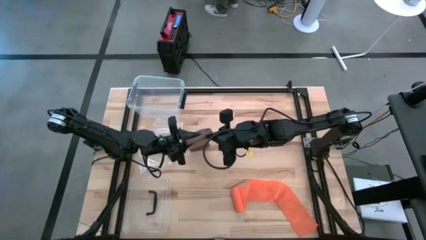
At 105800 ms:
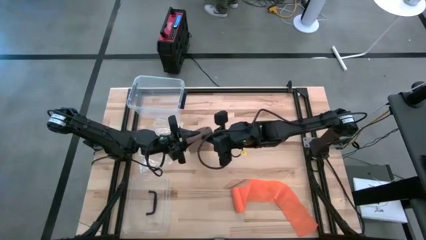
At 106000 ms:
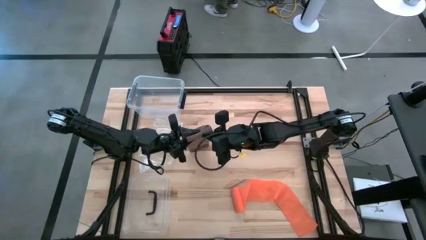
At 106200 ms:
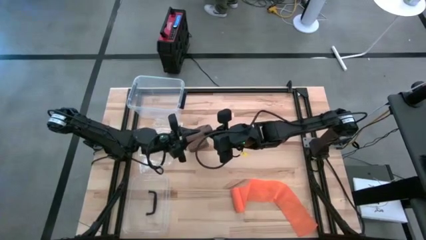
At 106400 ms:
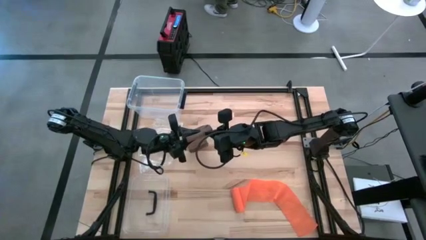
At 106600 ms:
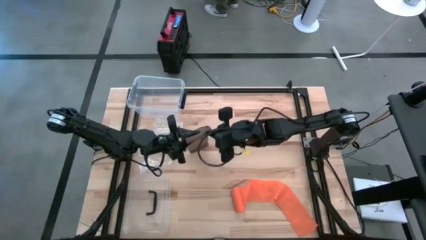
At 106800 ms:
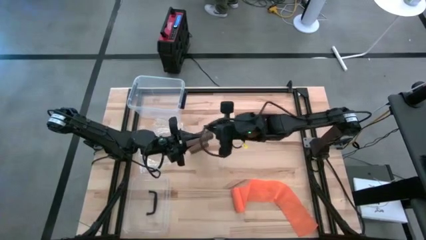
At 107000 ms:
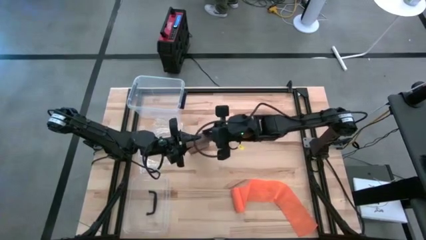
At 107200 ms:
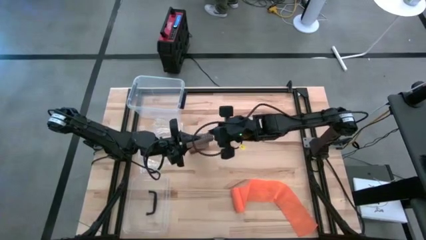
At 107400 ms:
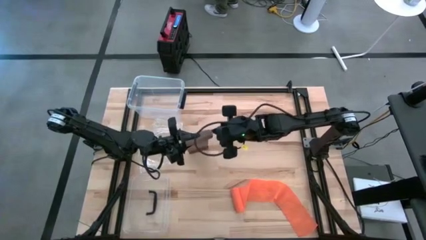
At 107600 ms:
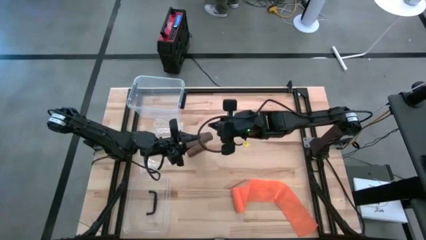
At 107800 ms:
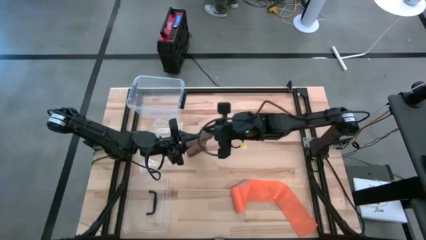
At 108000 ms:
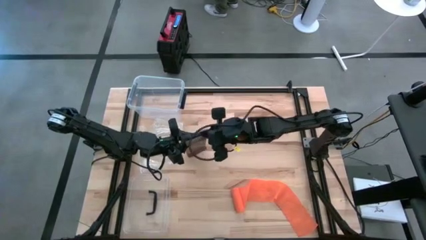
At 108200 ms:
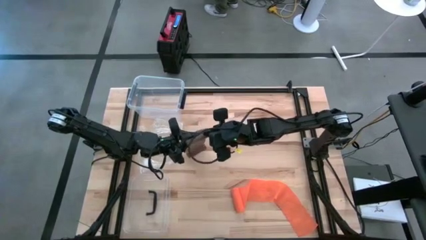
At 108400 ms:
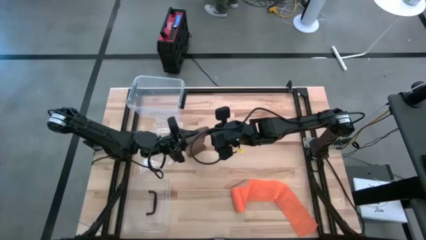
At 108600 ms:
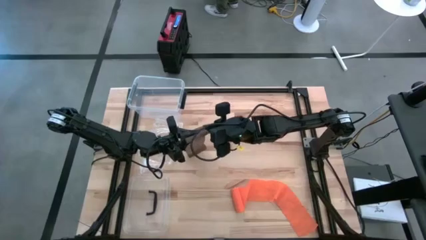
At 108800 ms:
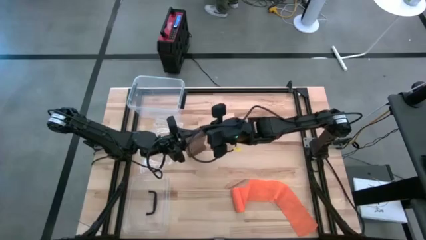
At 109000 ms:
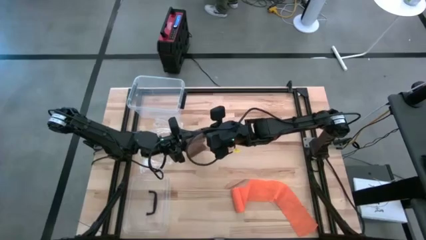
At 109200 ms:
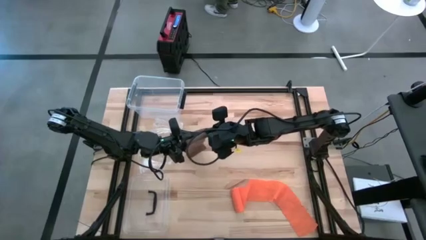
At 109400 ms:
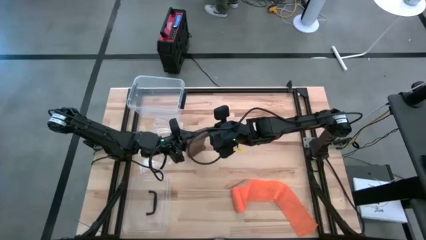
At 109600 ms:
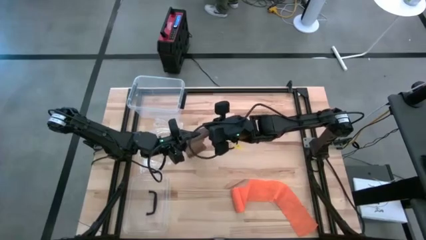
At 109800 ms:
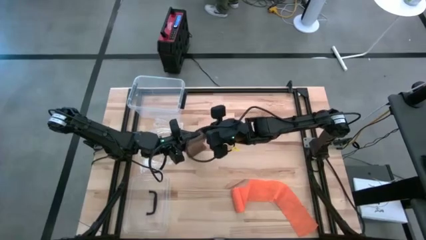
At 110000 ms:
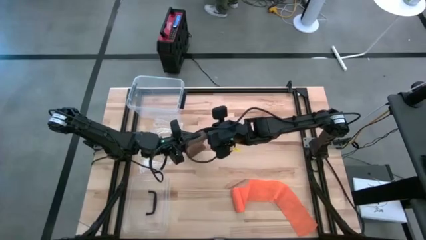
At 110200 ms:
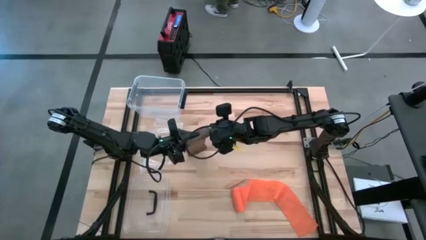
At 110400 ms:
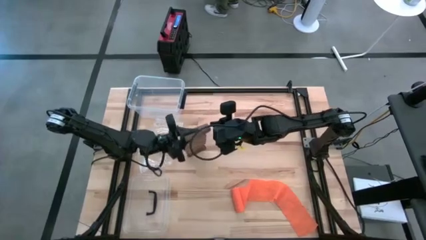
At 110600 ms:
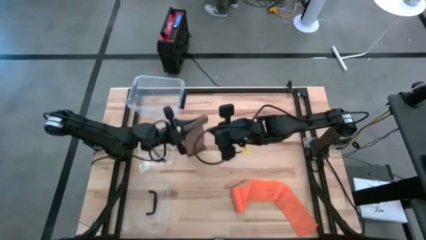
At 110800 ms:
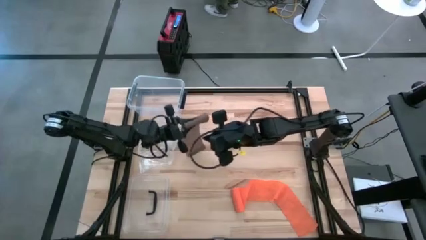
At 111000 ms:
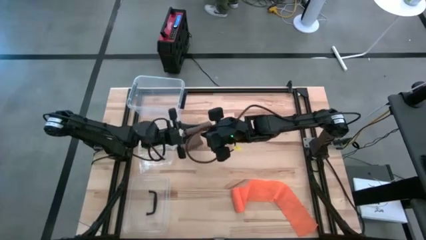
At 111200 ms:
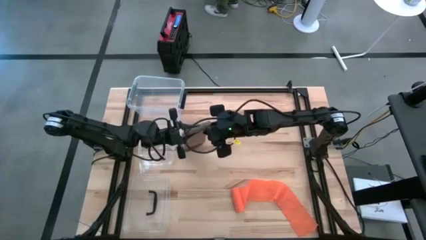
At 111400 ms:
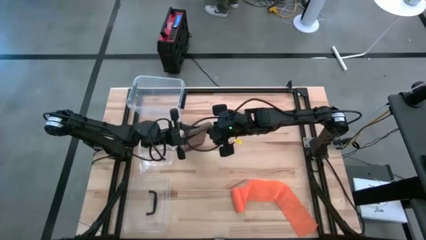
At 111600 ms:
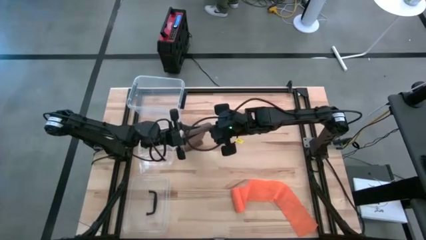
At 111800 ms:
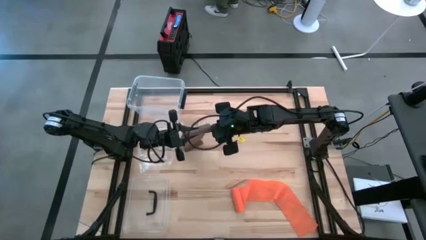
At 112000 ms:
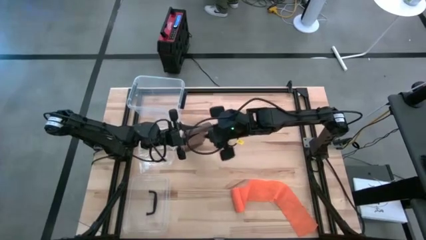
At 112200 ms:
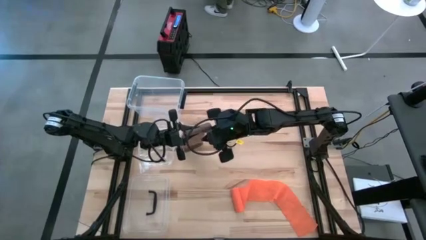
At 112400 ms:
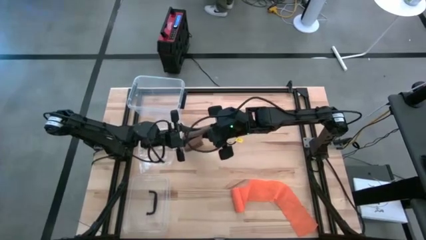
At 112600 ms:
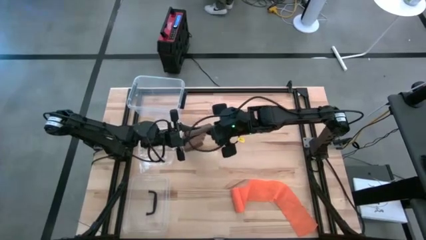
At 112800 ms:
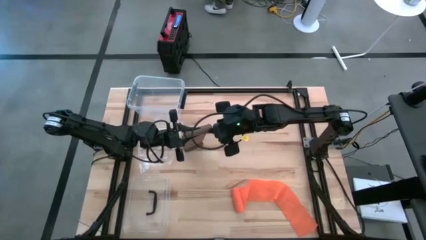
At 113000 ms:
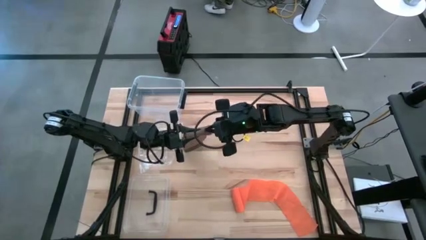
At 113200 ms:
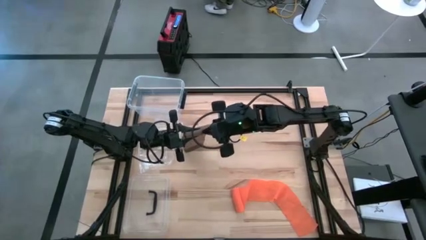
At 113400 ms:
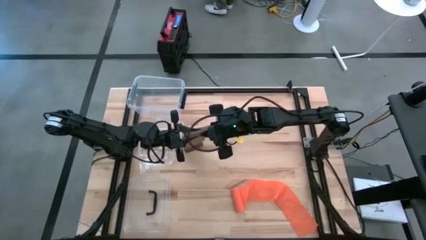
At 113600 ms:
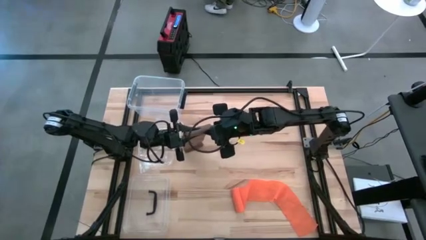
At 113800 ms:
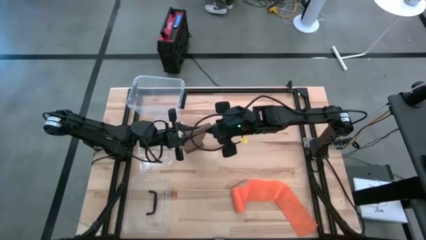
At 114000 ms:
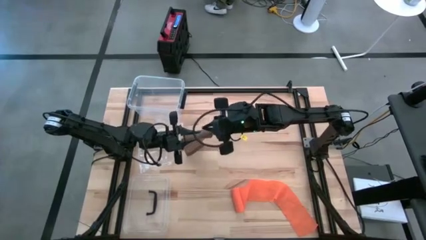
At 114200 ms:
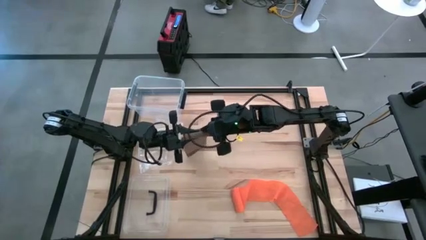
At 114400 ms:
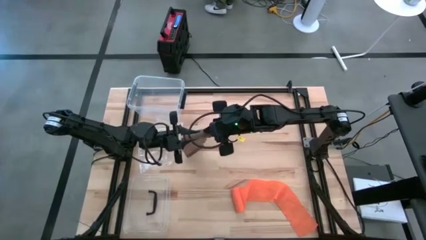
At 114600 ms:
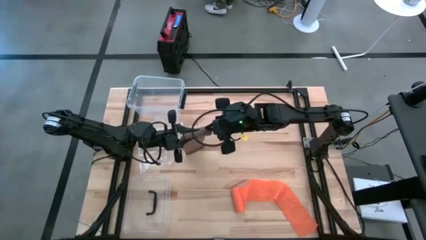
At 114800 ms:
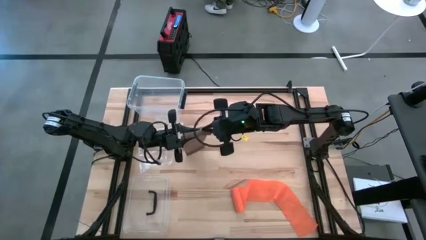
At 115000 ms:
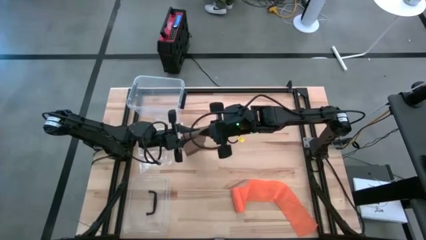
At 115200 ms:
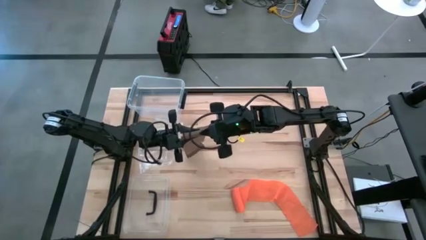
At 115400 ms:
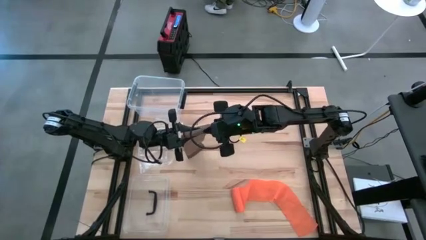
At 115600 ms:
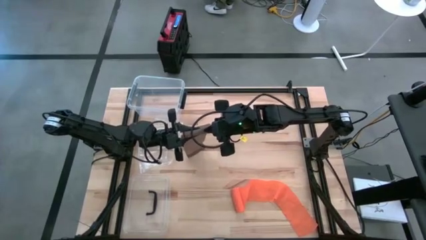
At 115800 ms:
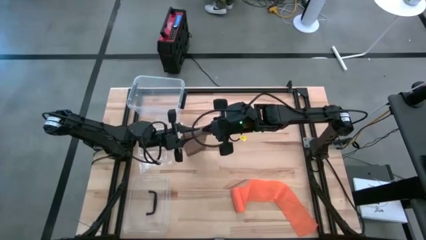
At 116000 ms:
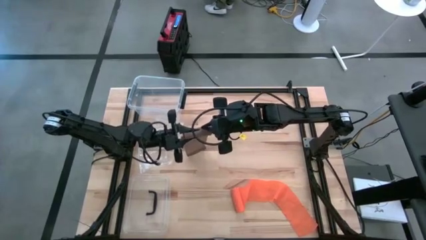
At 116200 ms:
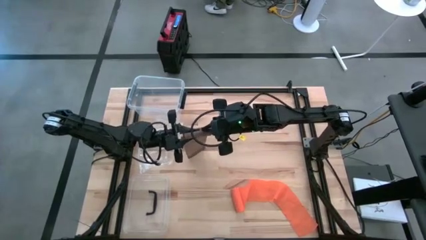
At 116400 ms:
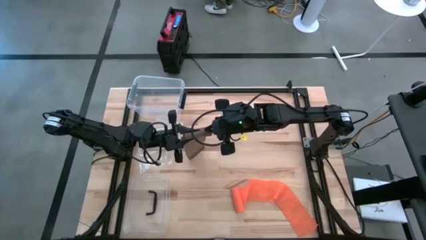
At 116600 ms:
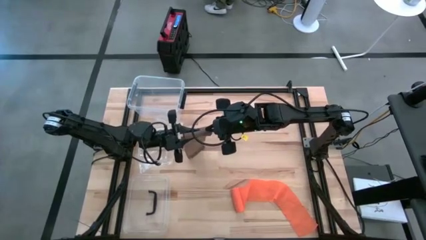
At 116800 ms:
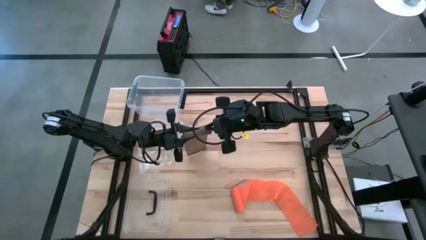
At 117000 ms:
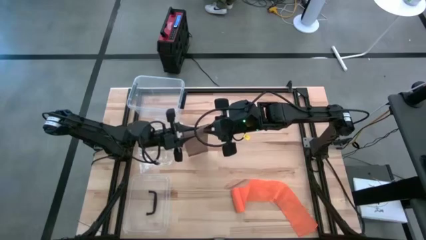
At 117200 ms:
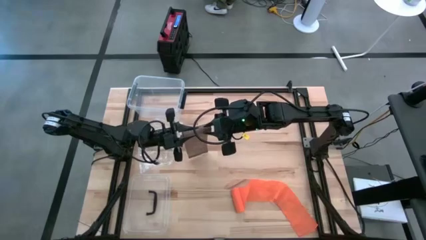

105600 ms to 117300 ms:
Task: Roll bandage
Roll the brown bandage

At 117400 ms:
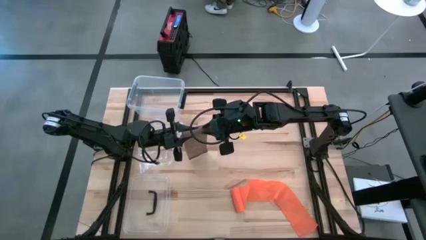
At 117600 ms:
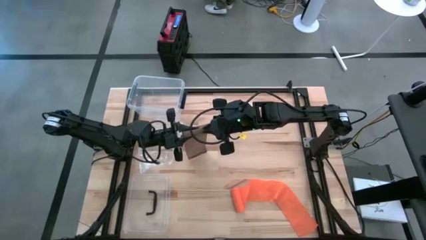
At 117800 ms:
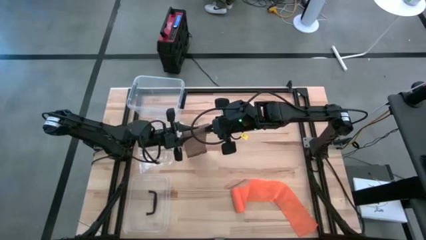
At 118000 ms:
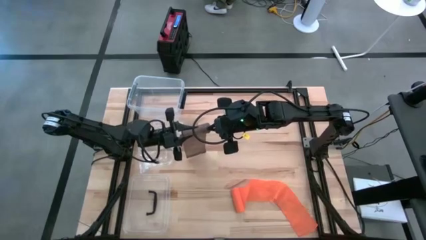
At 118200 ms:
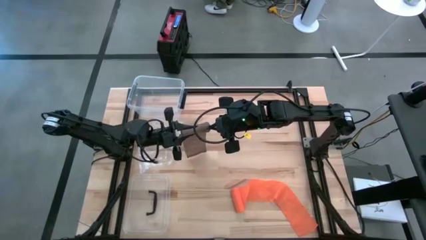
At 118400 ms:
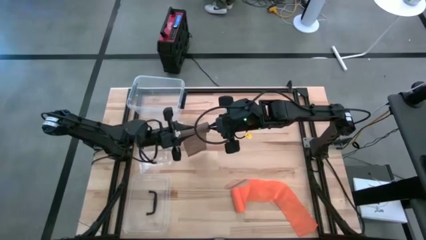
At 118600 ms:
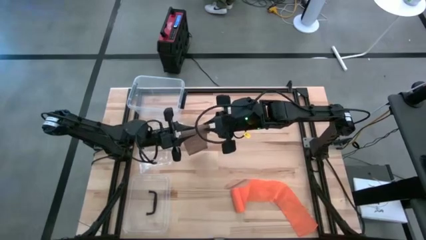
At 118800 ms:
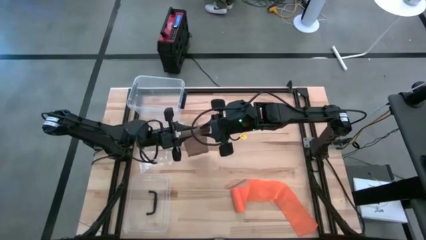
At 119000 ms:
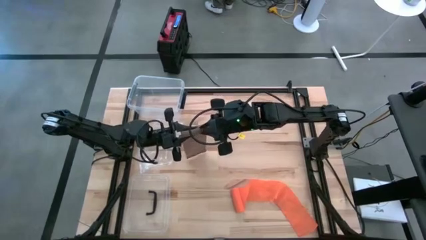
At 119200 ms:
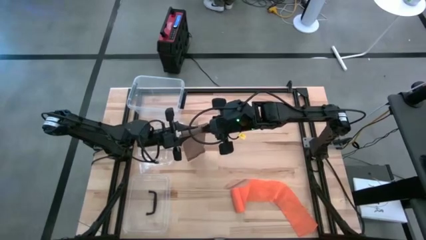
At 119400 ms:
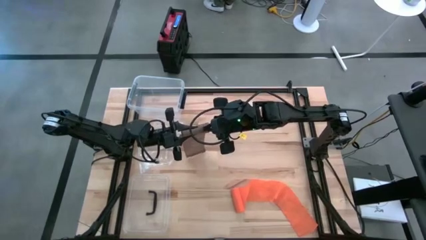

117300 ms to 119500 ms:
Roll the brown bandage

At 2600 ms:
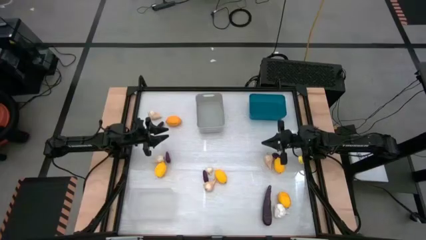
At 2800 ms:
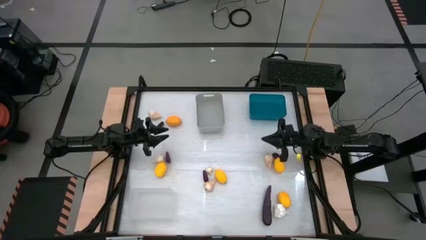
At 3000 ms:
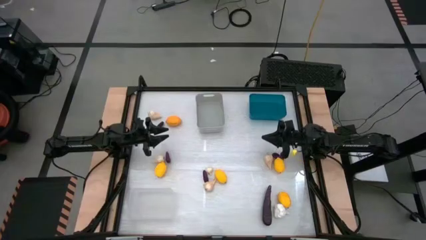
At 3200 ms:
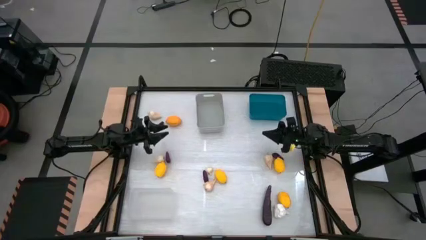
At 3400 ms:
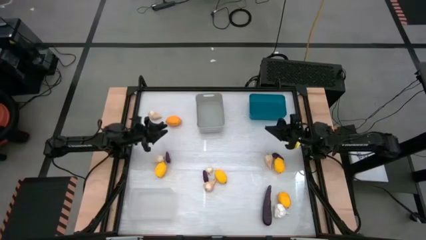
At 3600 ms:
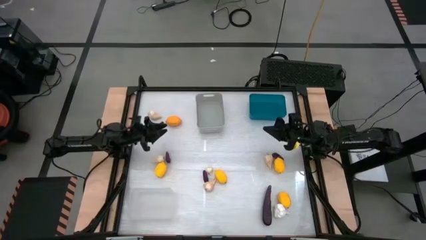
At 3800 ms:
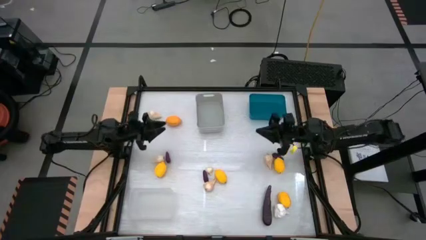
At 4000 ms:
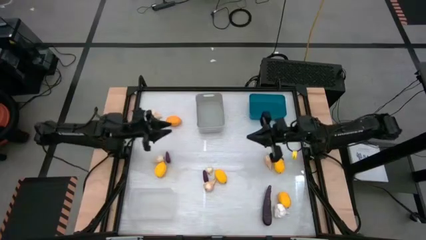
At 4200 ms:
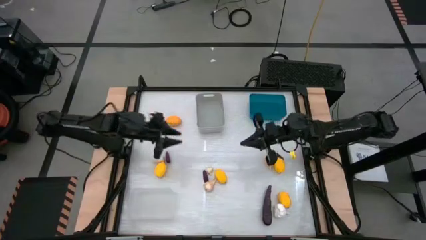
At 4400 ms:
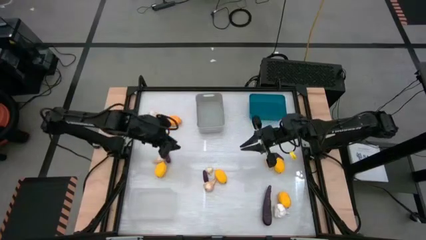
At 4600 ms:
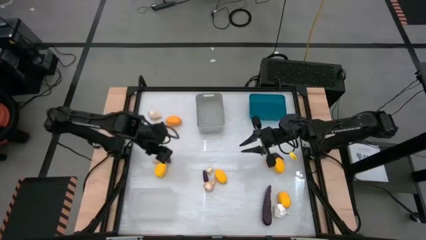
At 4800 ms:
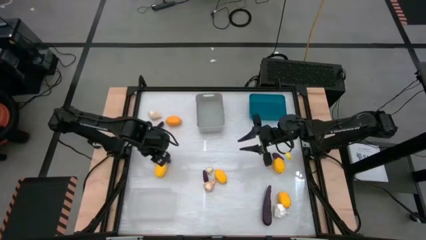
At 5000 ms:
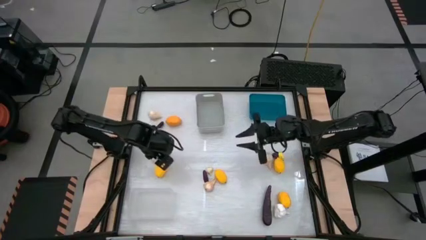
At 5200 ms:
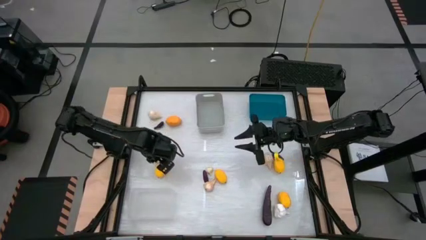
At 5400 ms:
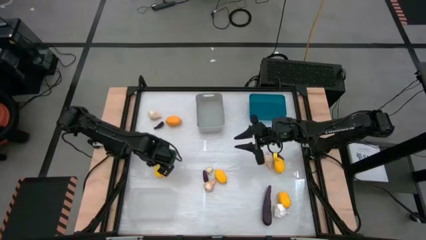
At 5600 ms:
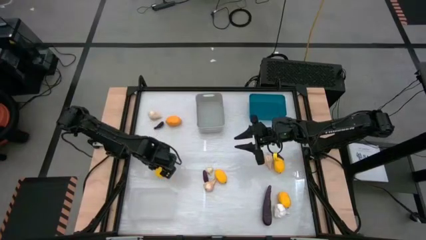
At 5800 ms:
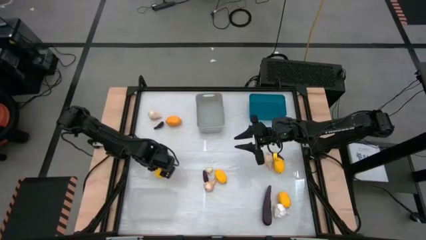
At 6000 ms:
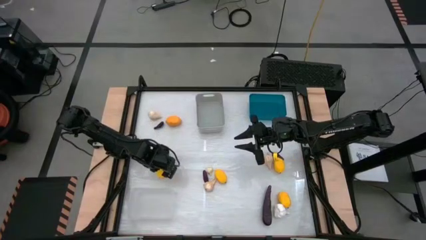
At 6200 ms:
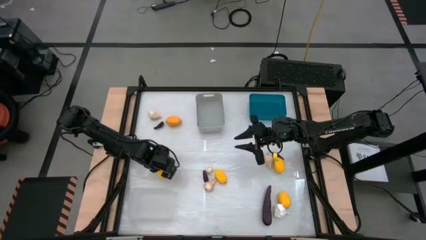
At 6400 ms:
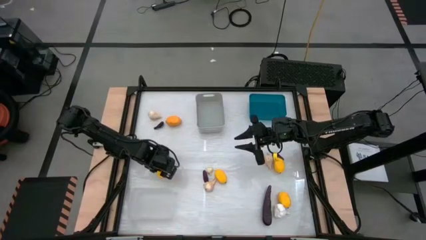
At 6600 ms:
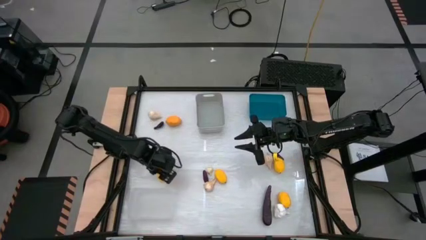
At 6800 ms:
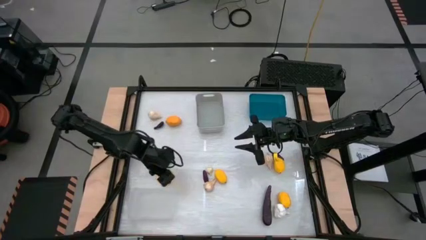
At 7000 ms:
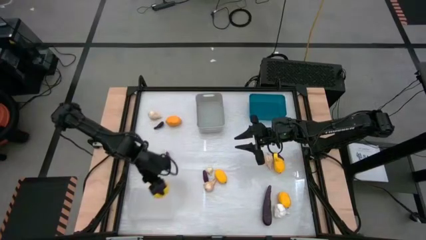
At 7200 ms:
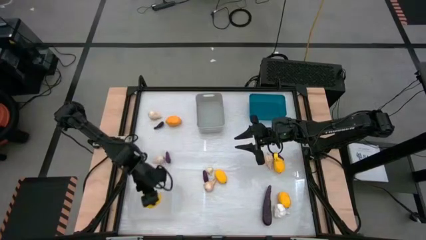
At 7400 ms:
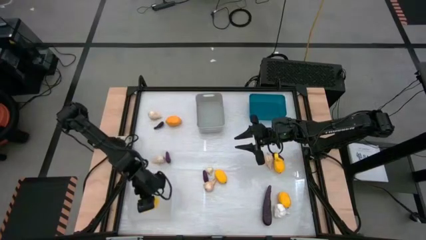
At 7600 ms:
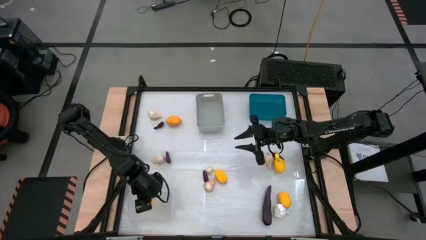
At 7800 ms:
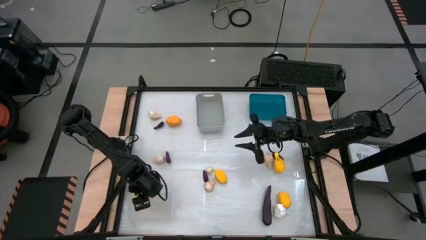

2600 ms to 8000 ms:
Task: Sort produce into baskets
Put the lemon into the transparent bin
